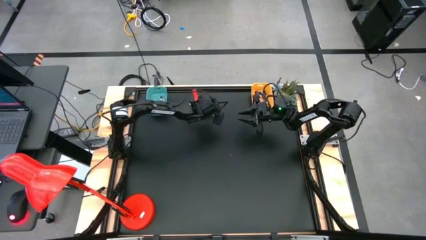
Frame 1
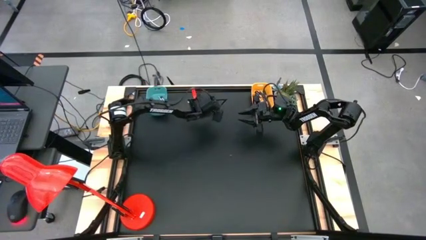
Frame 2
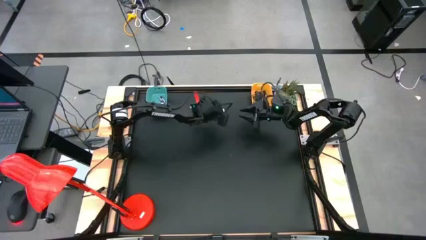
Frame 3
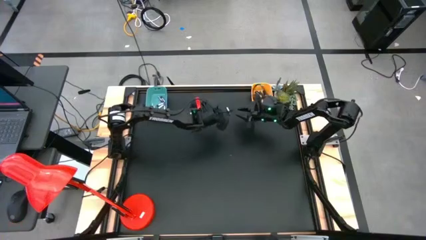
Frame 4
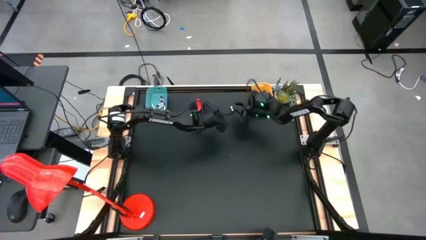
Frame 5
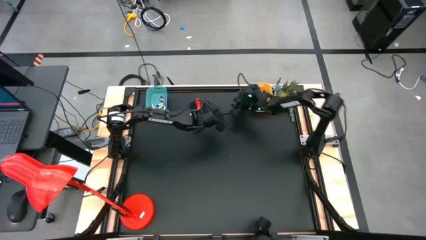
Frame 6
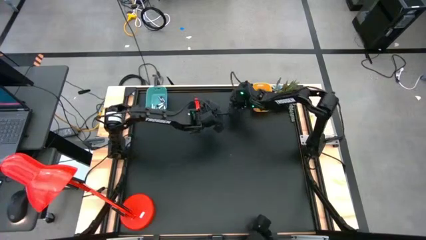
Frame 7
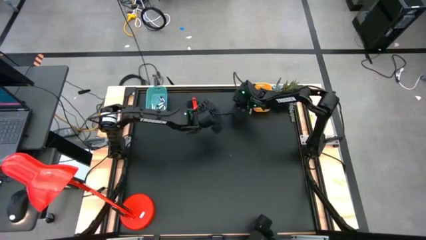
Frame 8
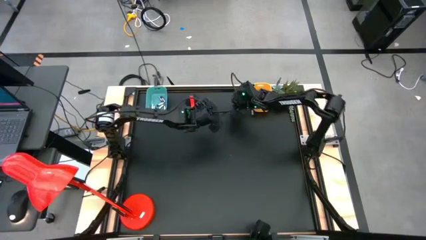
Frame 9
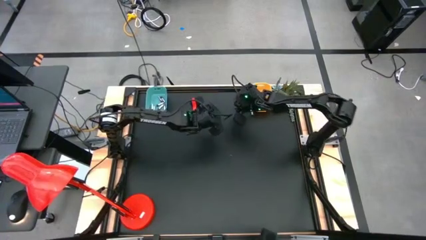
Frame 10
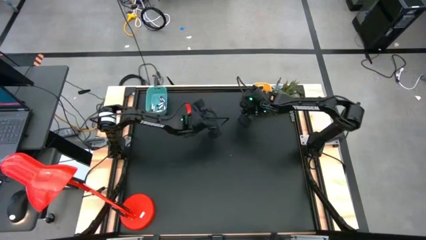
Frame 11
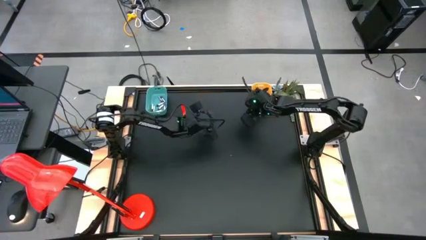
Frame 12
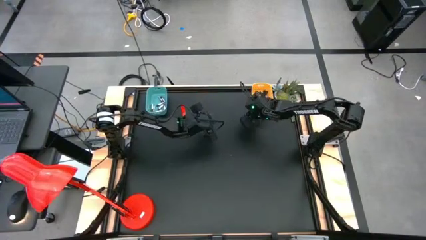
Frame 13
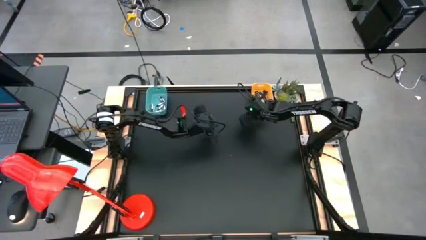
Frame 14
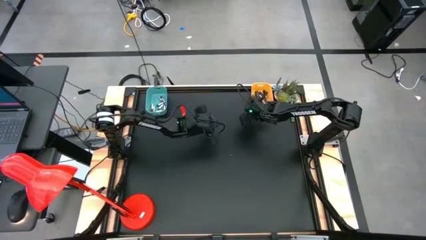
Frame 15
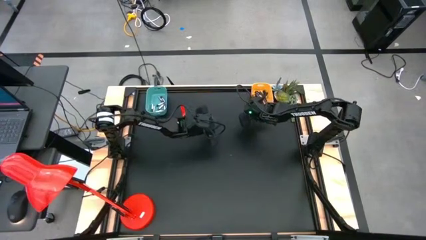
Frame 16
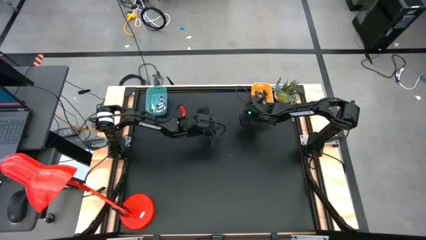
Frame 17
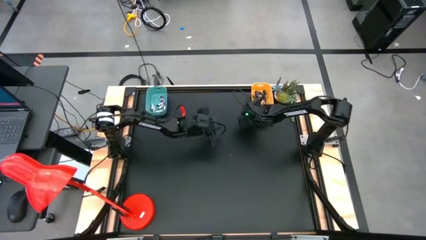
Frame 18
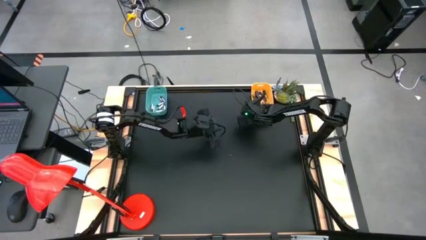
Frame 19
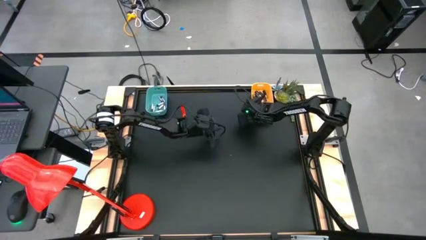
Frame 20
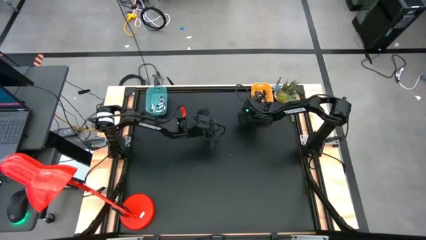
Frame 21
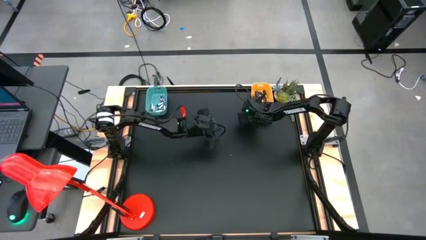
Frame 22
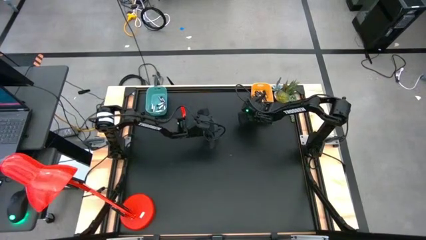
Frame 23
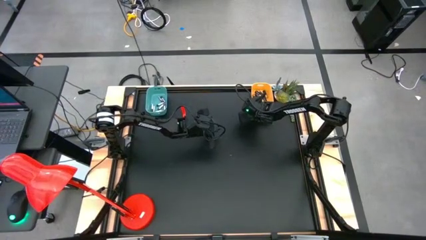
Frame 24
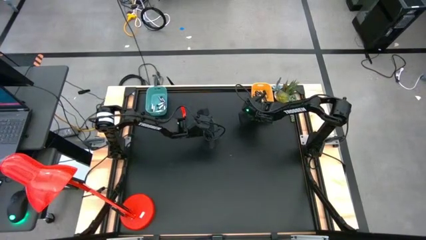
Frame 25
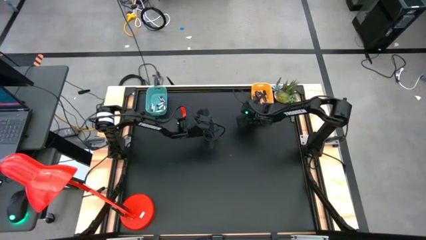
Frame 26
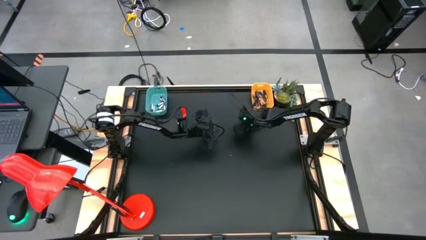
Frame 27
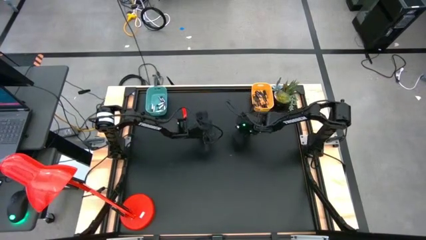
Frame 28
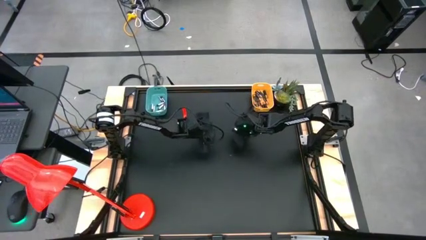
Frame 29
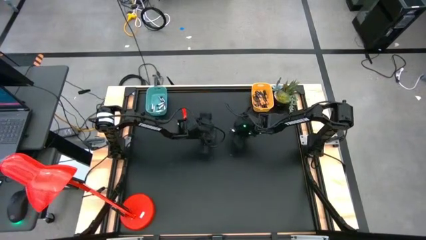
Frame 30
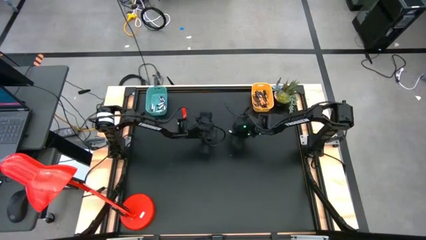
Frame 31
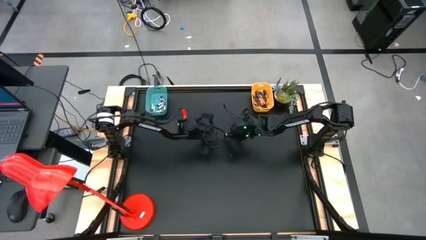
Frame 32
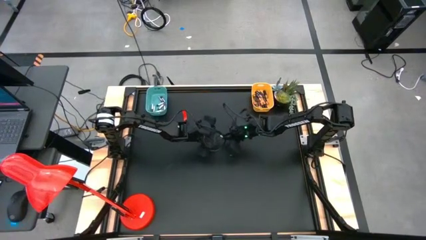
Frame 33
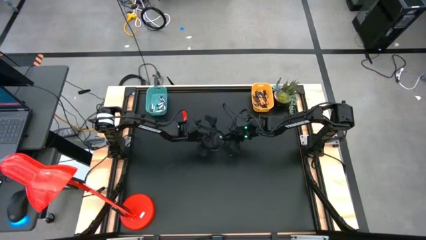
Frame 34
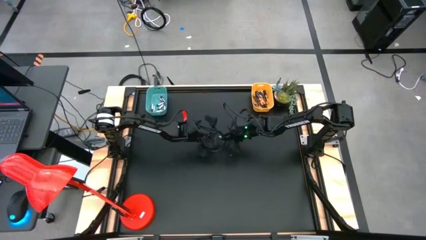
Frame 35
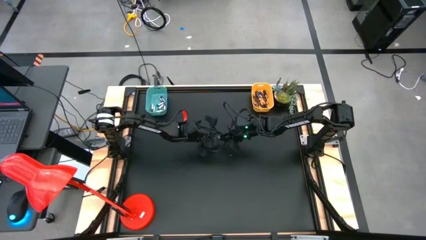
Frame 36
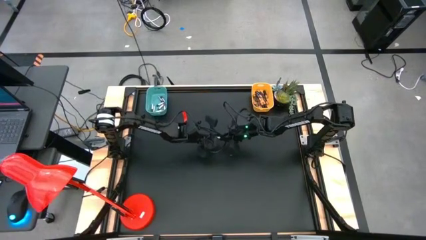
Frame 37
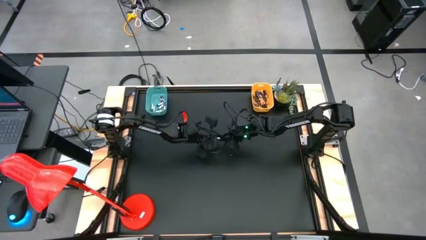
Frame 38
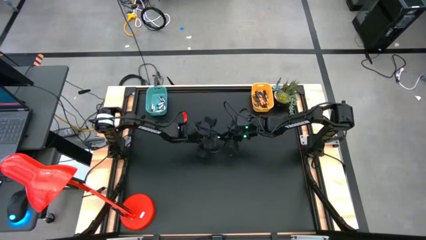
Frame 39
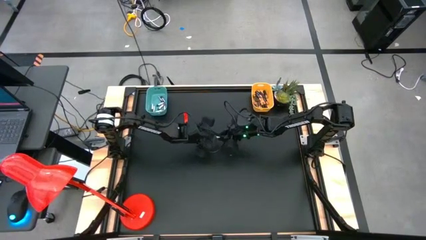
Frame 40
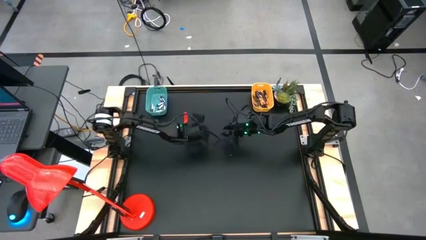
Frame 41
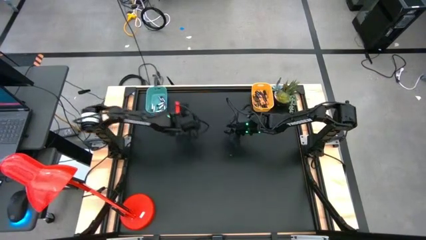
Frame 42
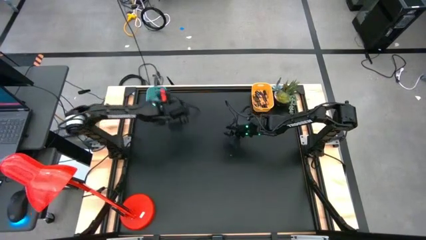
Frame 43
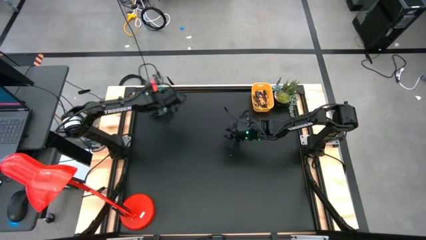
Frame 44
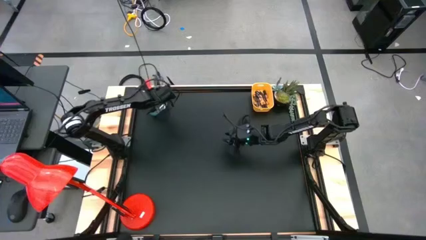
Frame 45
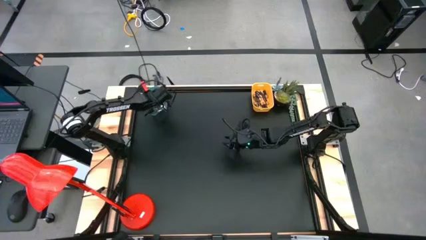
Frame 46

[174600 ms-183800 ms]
Task: Sort batteries
Put the silver battery into the blue bin

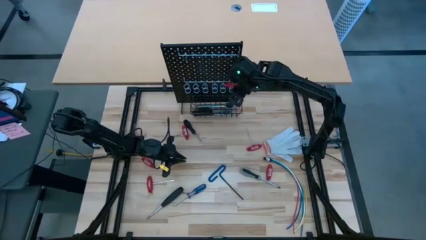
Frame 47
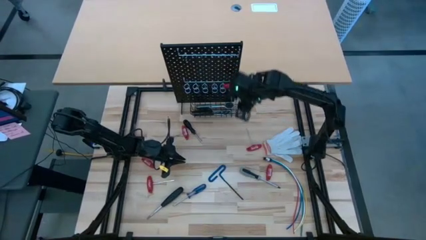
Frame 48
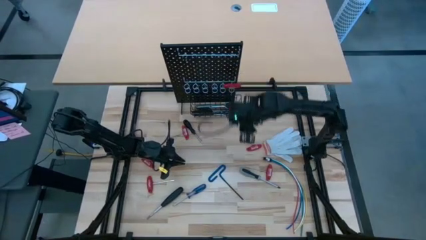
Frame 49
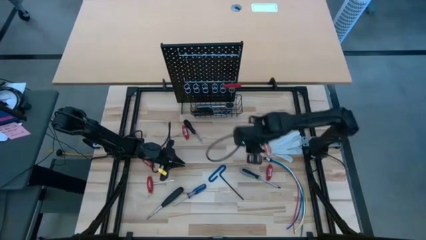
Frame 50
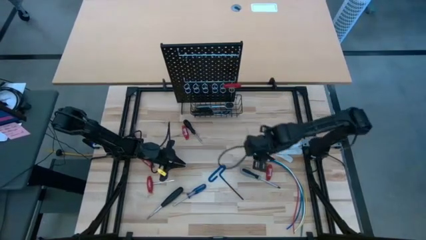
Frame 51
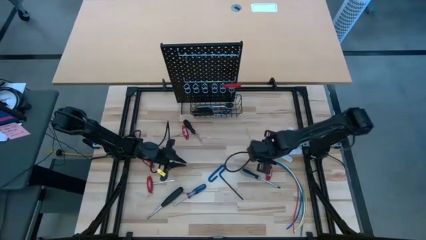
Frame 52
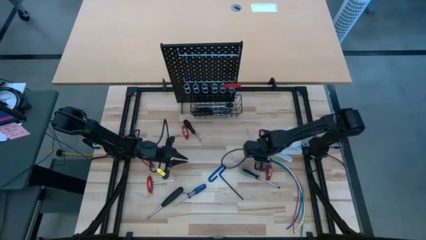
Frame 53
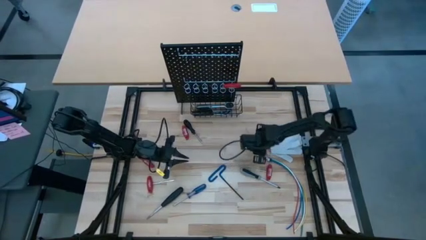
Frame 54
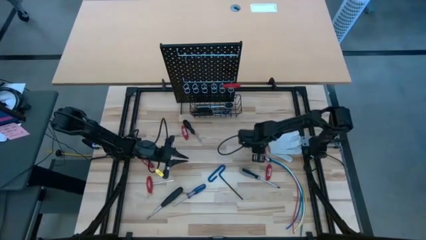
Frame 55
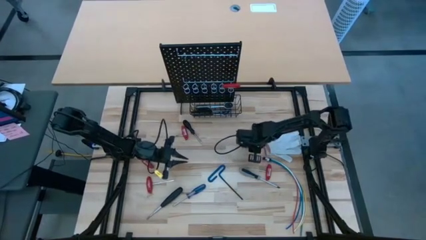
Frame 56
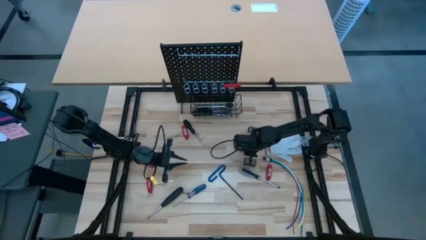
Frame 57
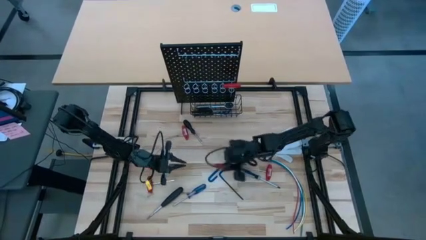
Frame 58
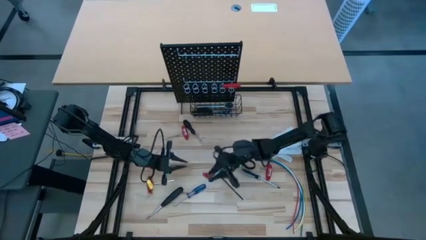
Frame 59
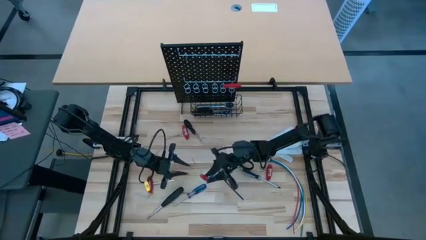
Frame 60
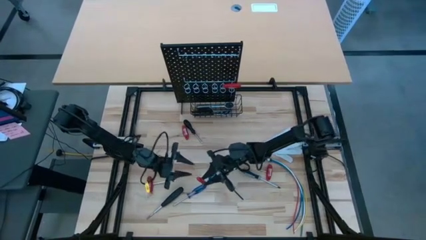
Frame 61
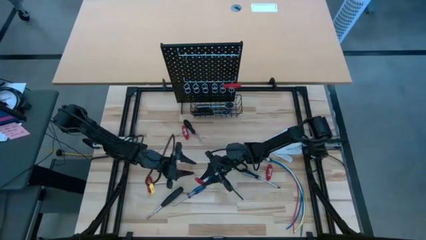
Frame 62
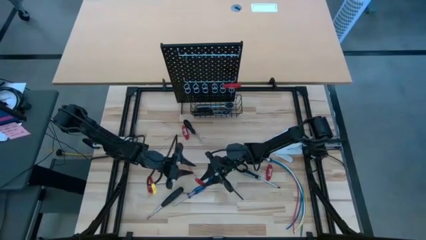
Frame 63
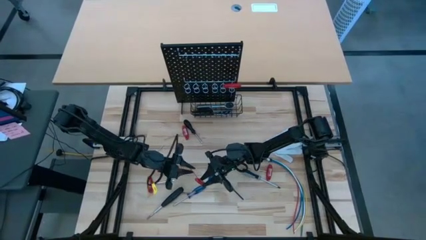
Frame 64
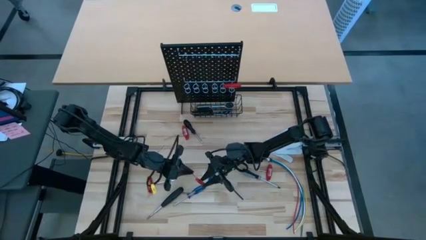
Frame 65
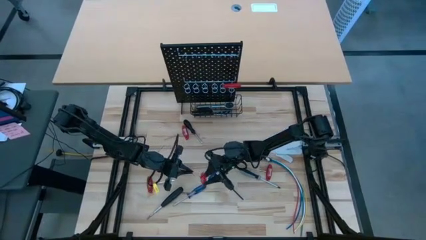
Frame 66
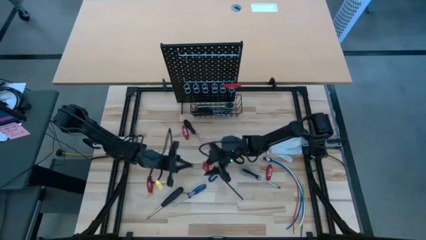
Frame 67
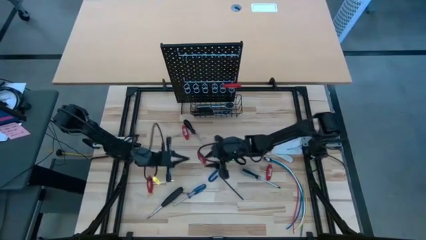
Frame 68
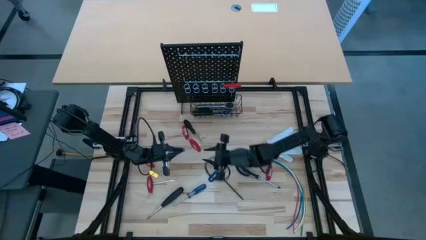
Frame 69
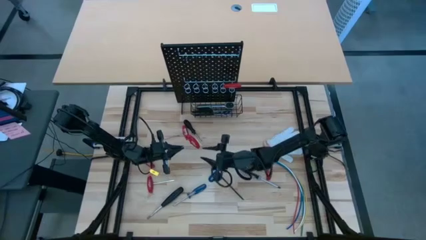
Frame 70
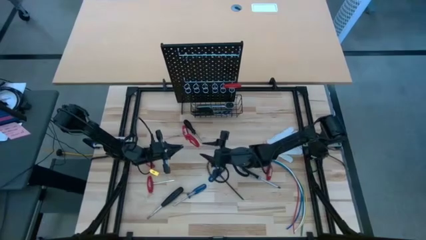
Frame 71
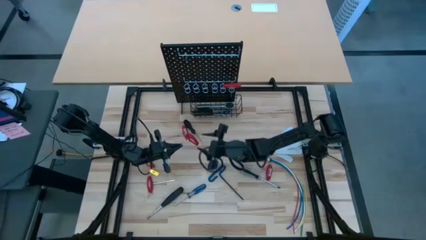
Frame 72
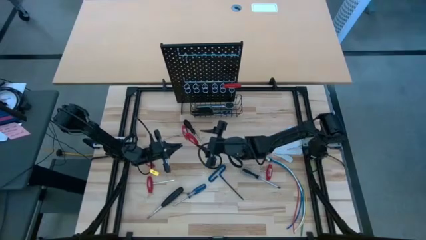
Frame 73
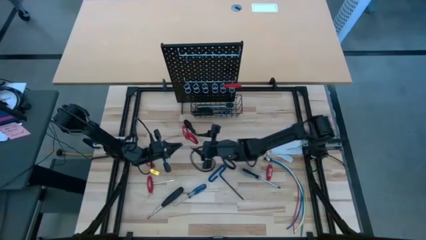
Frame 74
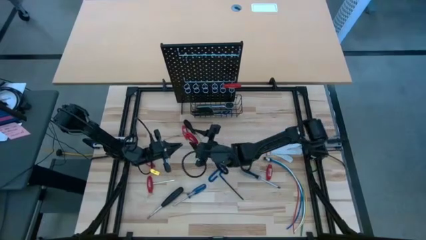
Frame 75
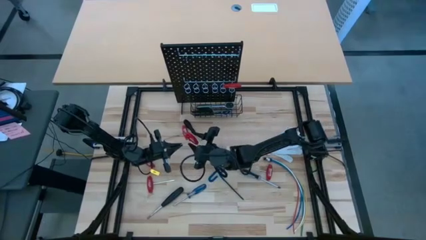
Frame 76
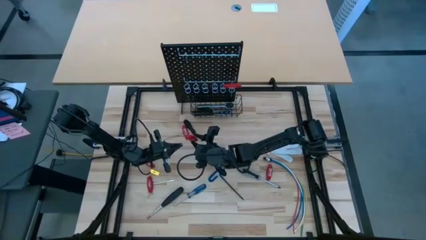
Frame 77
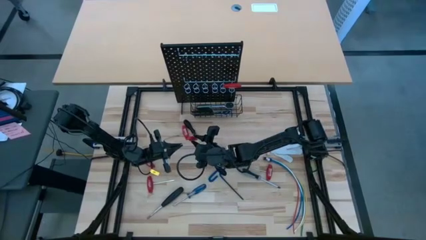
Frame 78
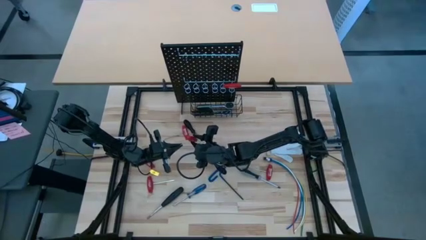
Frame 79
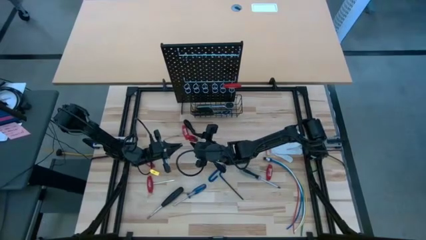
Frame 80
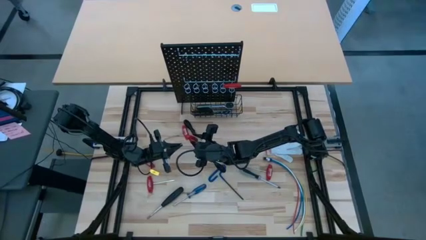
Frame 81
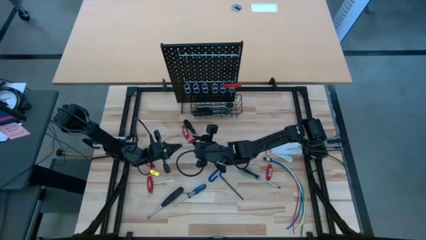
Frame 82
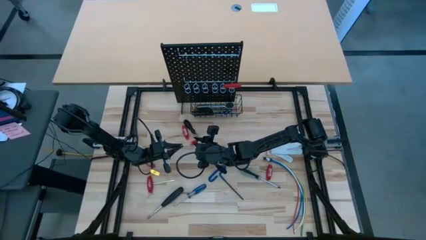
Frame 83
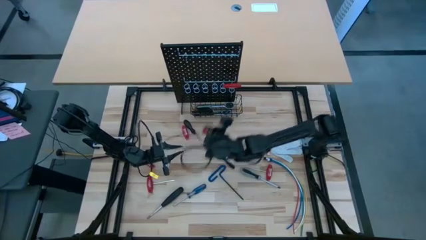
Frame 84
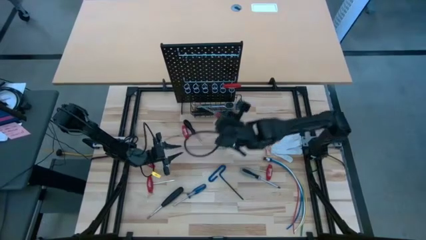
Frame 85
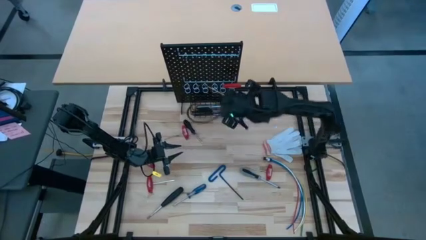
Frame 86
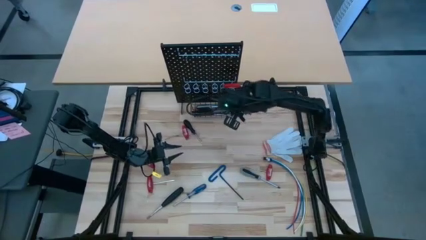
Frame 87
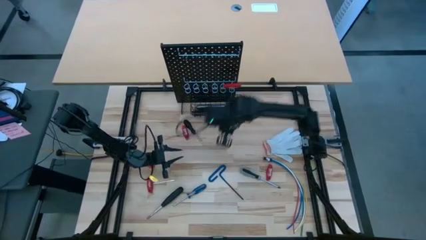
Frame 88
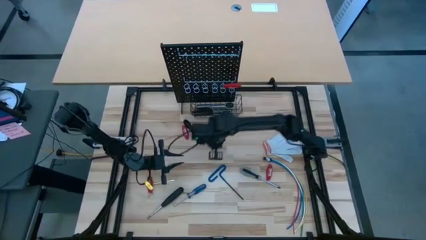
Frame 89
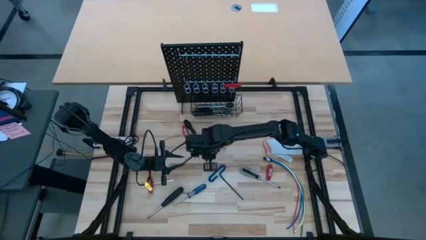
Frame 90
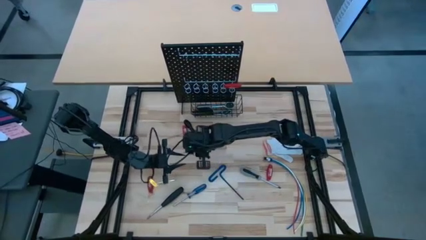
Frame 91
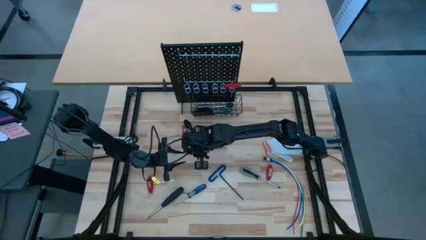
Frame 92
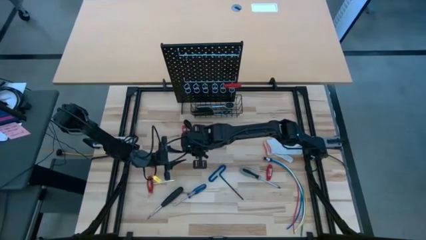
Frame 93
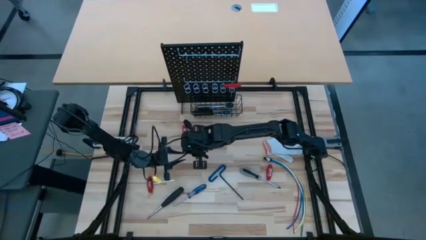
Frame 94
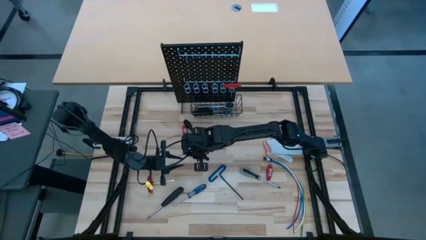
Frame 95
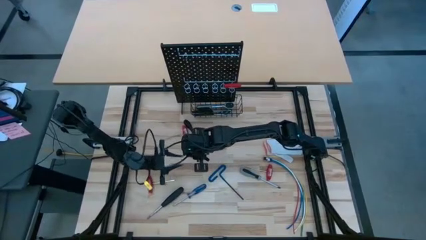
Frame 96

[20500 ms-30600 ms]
Task: Hang tools onto peg board
Hang the red Allen wrench on the pegboard
